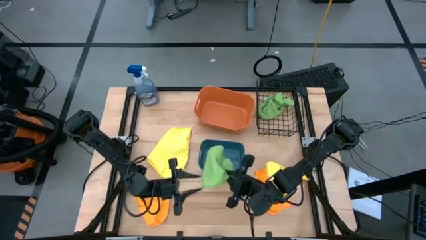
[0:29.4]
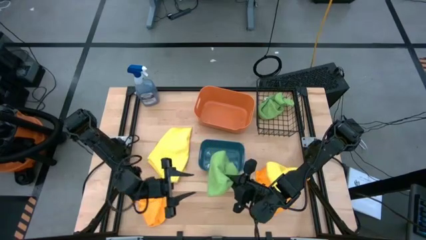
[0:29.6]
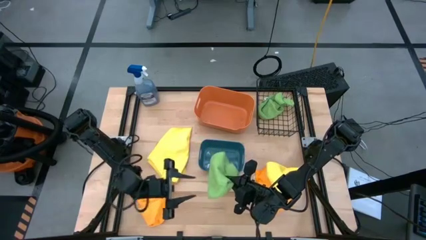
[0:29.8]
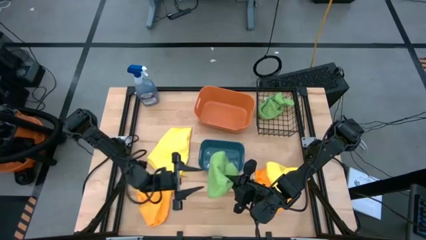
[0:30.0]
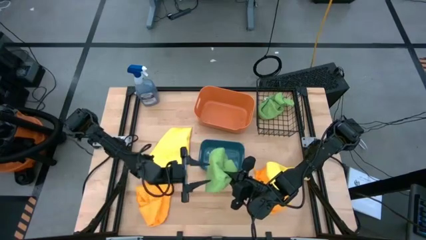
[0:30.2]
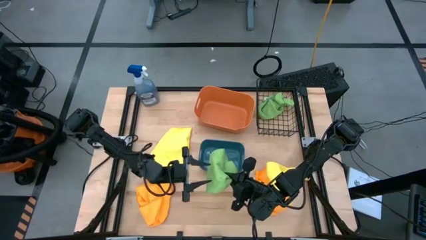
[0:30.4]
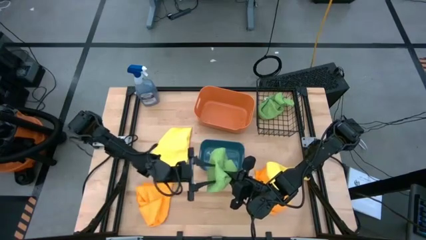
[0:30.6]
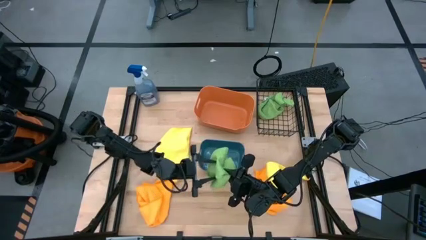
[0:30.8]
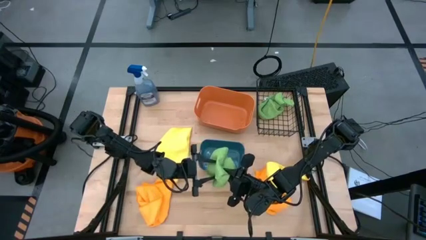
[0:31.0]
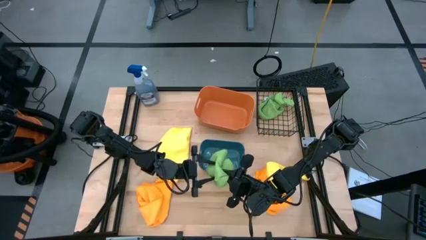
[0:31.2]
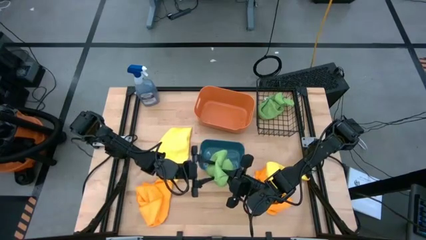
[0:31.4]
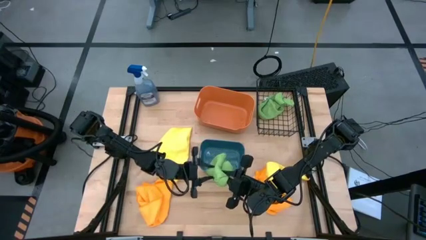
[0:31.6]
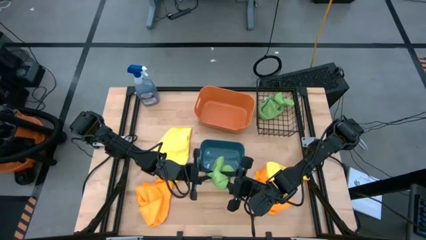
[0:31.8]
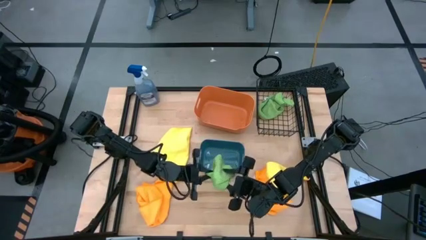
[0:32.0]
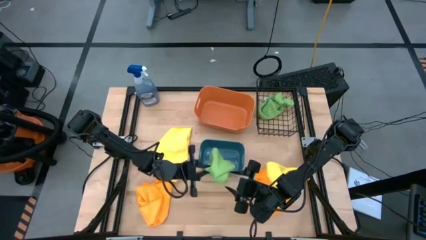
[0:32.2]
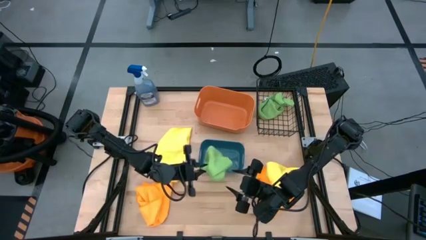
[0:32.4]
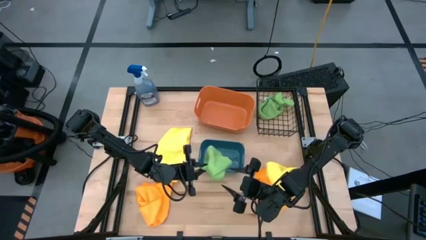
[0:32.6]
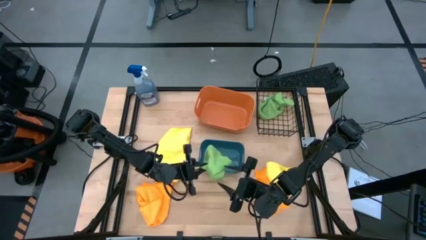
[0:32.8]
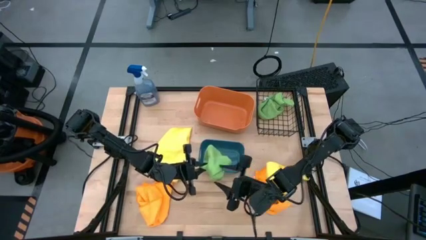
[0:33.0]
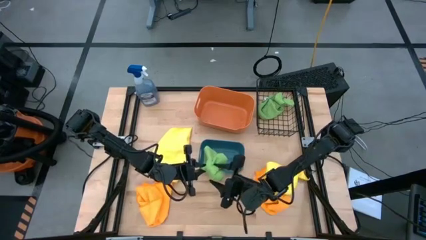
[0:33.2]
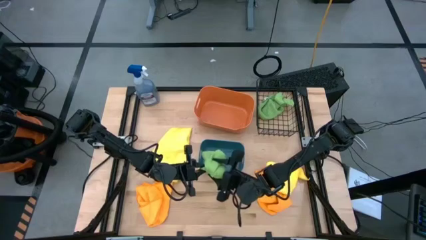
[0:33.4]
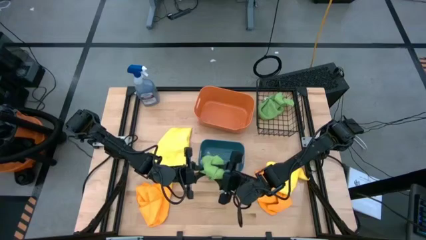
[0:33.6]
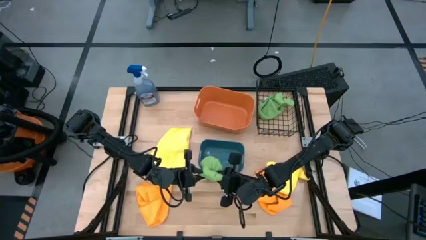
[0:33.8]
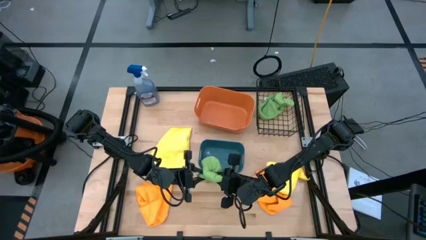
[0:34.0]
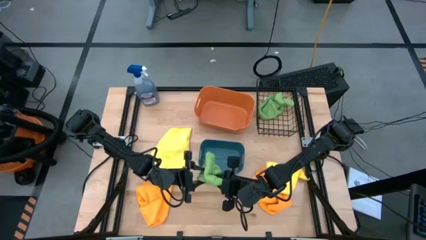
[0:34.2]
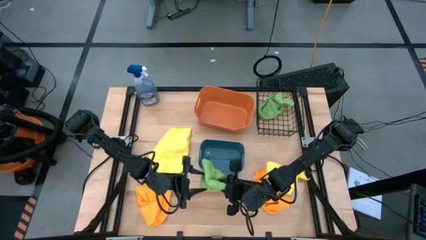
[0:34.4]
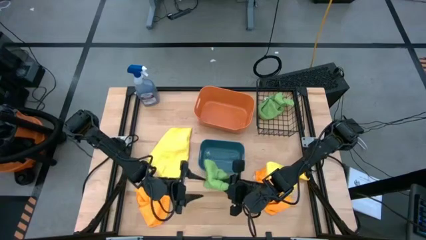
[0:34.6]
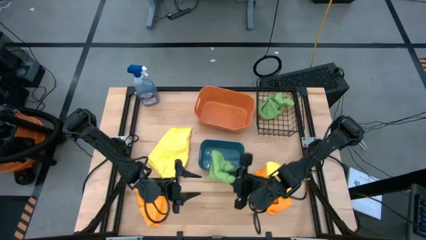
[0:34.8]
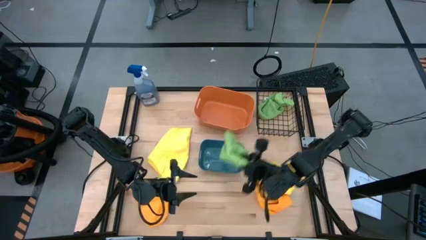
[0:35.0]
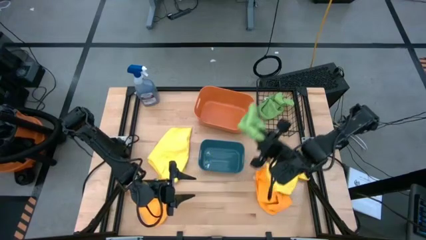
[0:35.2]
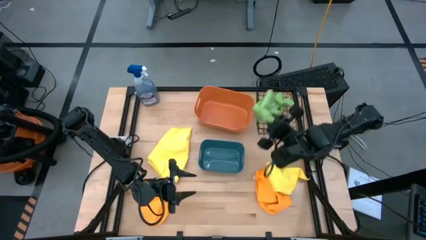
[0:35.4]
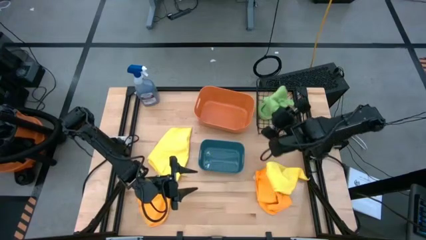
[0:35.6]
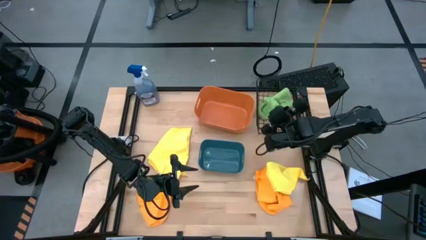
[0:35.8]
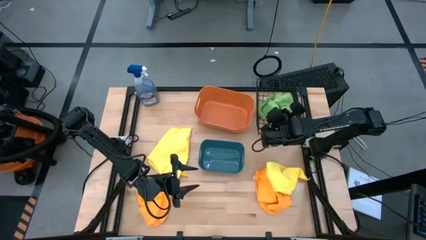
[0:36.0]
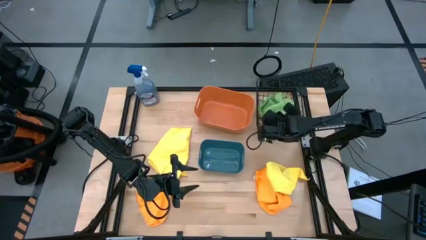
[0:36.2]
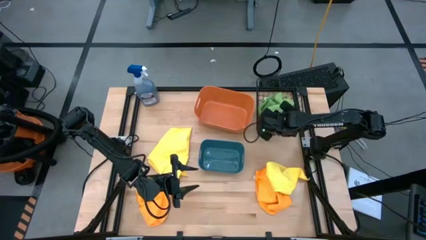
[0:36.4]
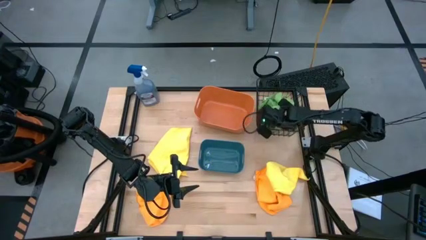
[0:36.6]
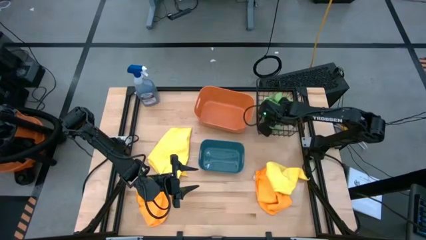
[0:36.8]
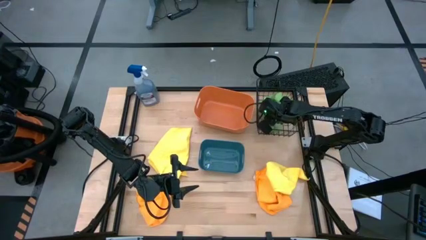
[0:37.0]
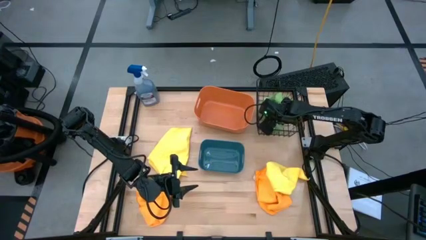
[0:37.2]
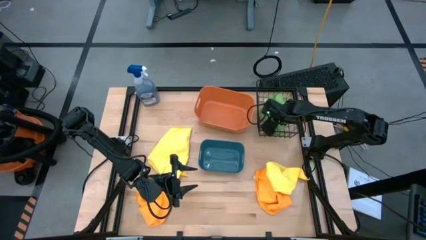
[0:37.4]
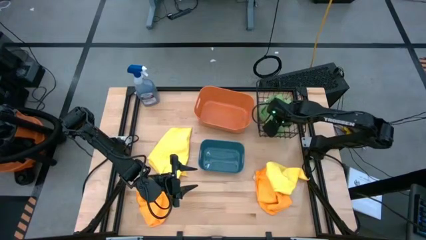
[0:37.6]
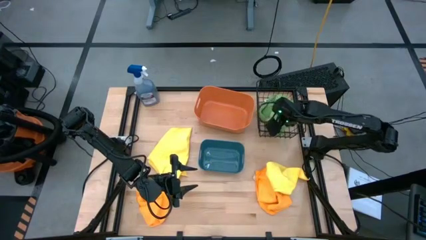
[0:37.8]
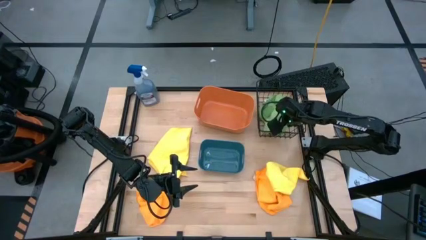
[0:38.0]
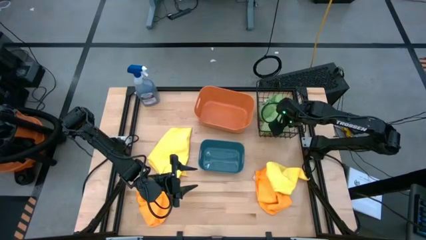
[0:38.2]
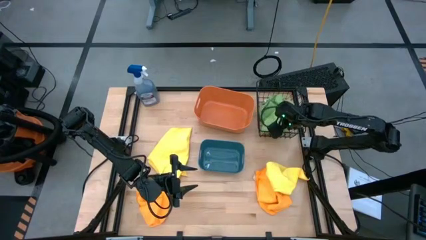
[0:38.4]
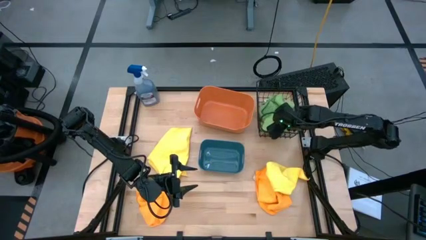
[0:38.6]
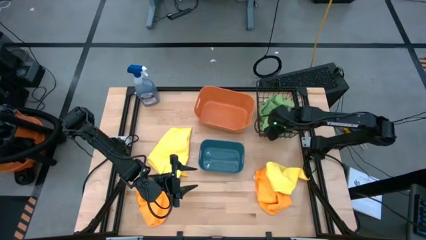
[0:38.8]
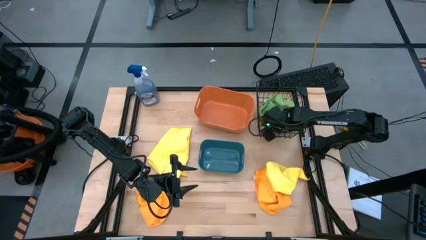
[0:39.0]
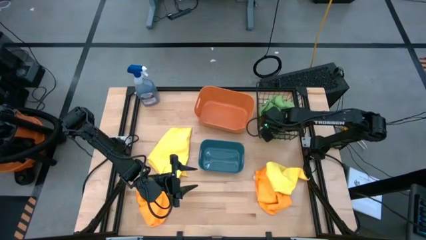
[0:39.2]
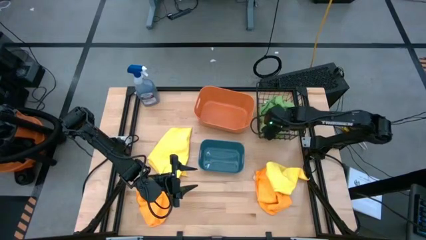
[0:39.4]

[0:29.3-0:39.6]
Task: Sort microfiber towel by color & place in baskets
Put the green microfiber towel into the wire basket
